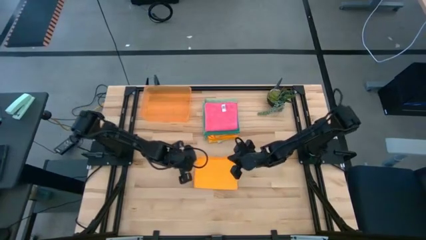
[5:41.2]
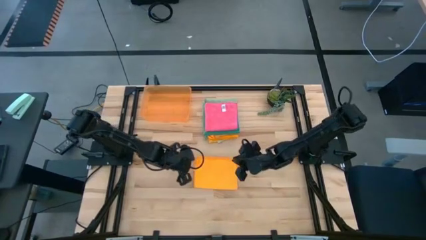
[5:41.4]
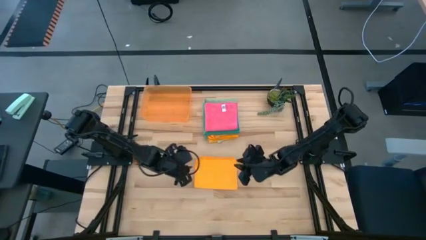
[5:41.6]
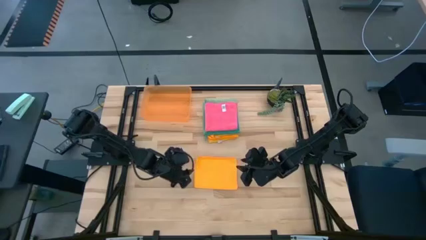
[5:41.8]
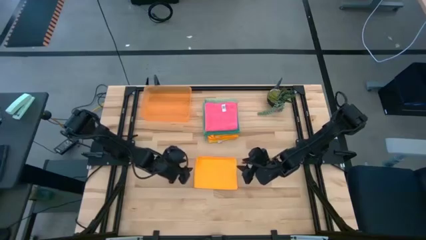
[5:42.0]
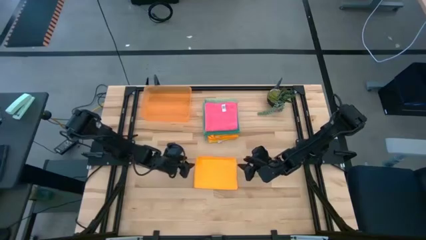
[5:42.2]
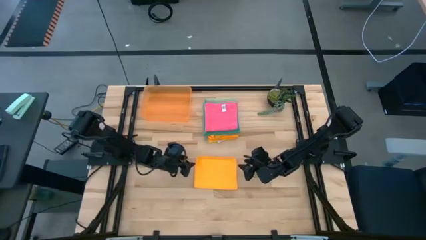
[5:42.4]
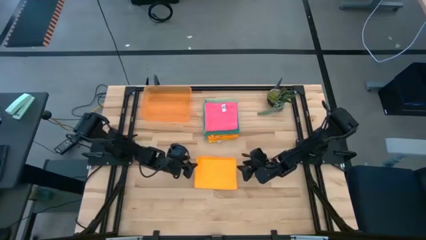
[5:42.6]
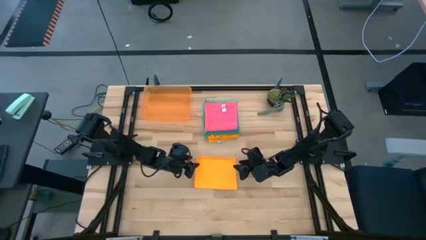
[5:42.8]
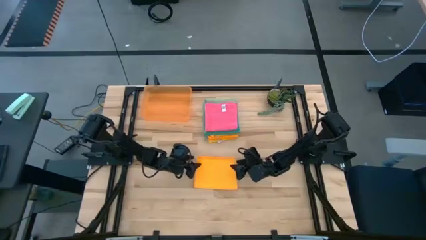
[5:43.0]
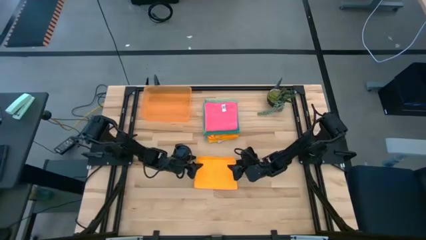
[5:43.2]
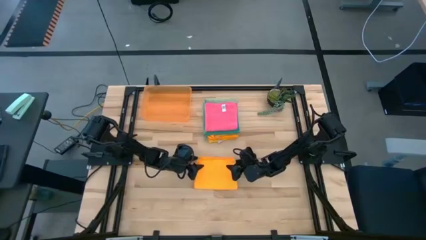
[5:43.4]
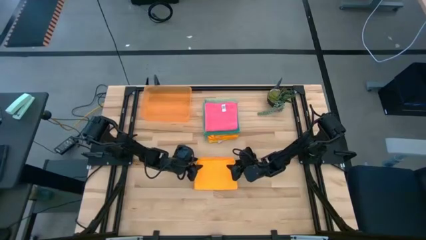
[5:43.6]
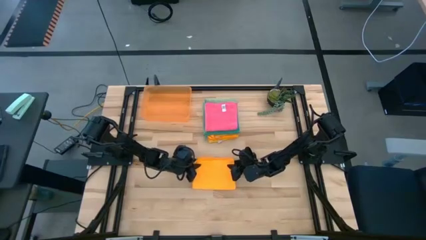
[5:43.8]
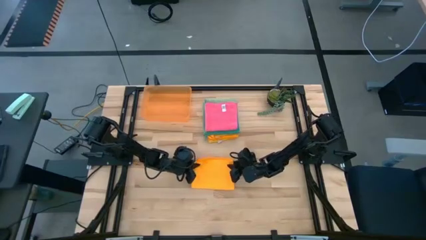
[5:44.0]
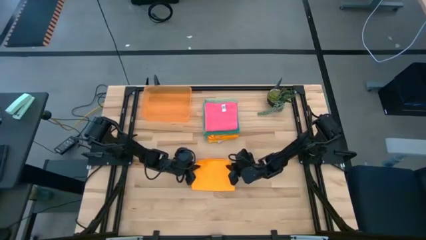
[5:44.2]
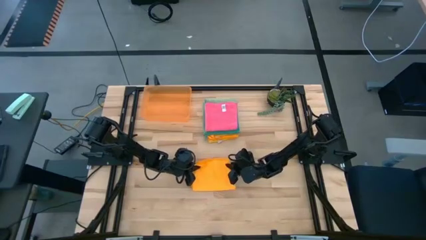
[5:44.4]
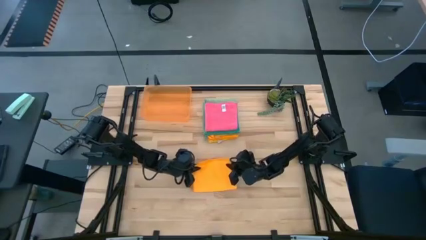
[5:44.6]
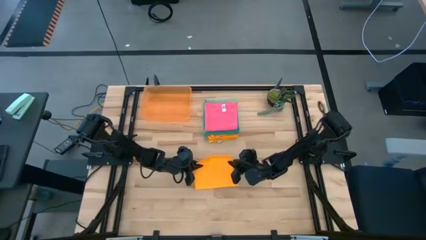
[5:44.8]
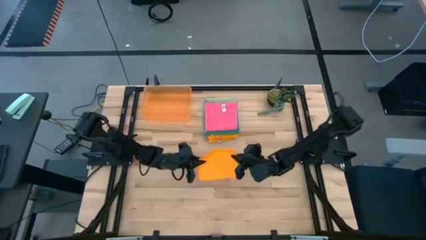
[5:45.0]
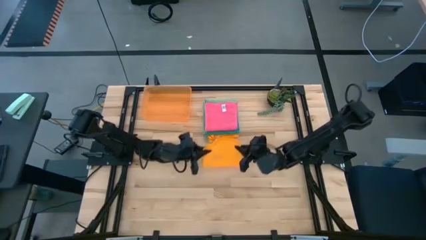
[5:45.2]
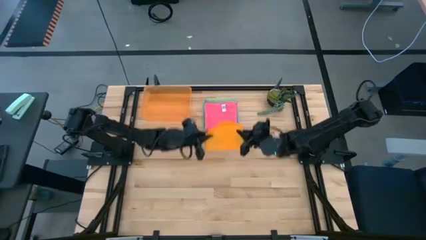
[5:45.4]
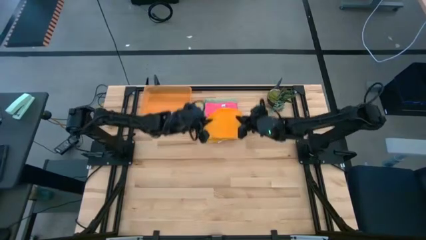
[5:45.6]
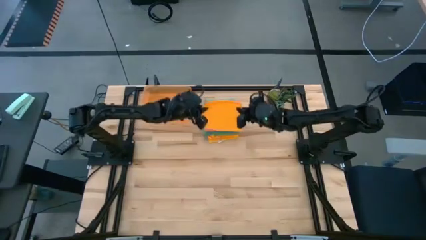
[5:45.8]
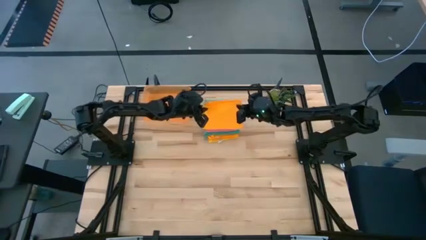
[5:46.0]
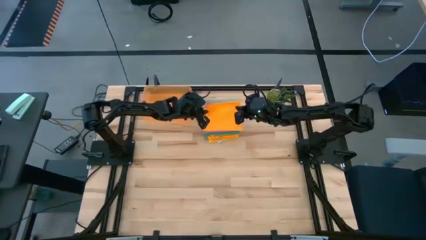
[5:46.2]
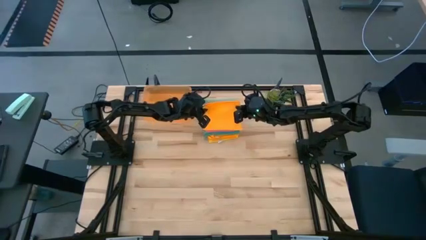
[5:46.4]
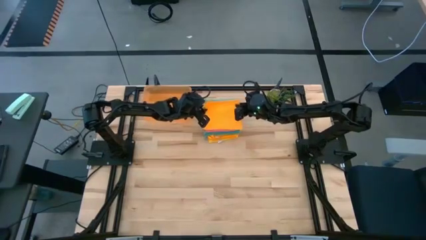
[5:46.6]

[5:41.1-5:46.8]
Task: Fold microfiber towels
Stack the folded orange towel on the folded pink towel

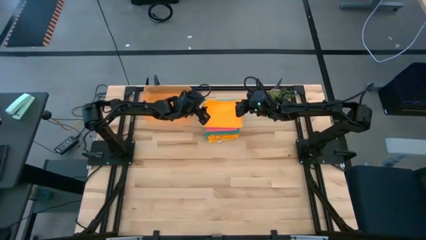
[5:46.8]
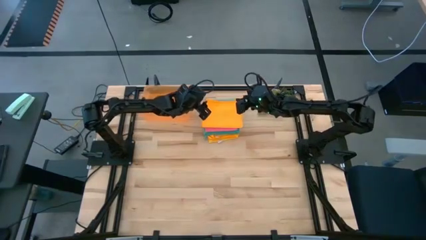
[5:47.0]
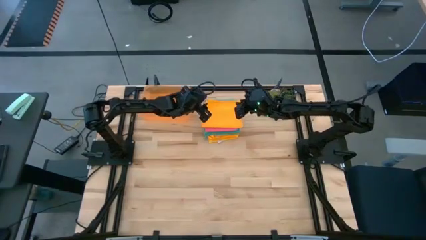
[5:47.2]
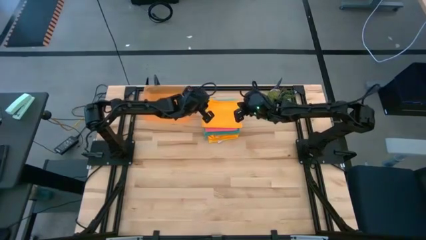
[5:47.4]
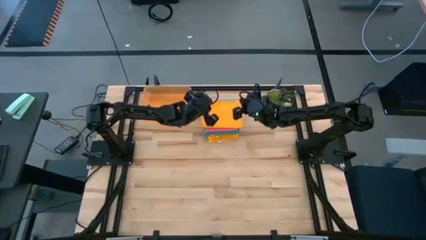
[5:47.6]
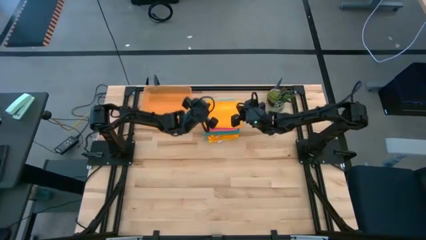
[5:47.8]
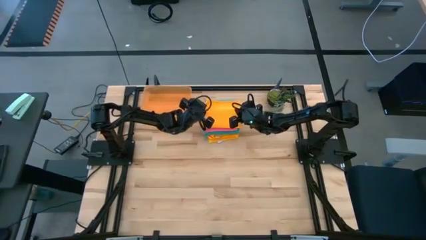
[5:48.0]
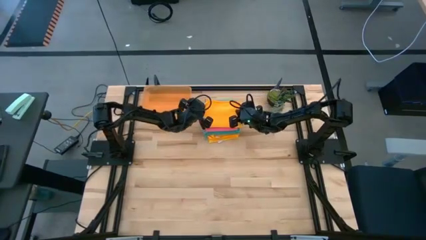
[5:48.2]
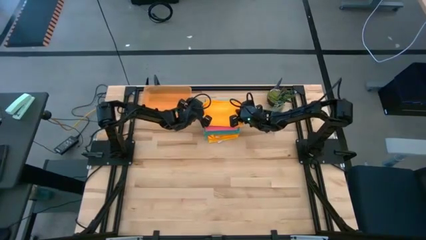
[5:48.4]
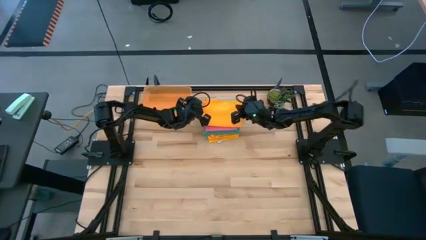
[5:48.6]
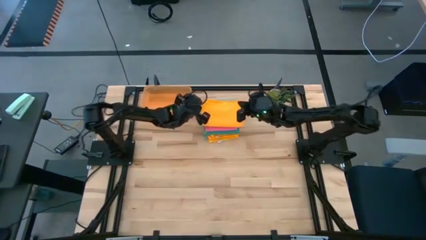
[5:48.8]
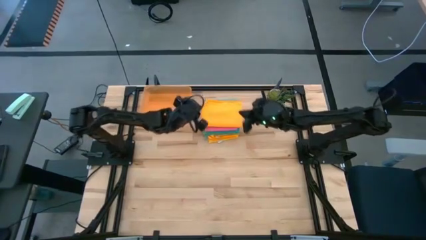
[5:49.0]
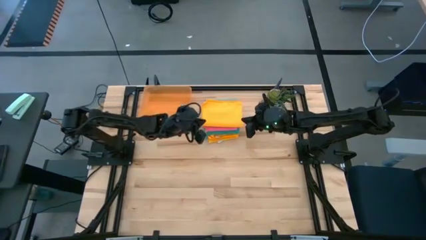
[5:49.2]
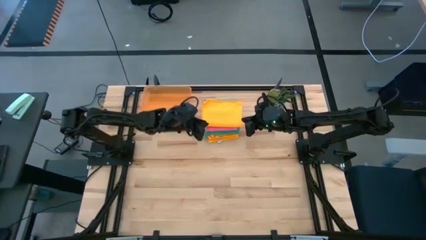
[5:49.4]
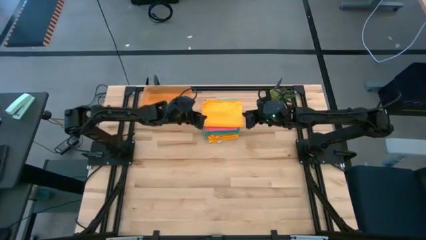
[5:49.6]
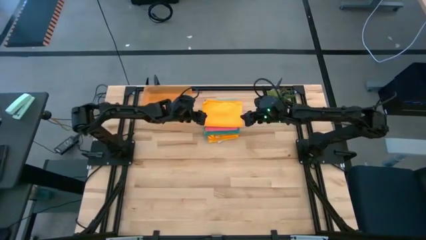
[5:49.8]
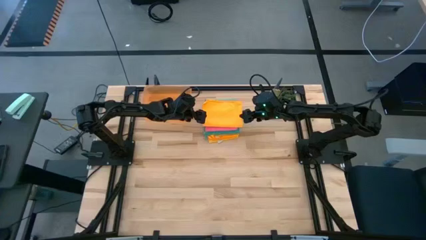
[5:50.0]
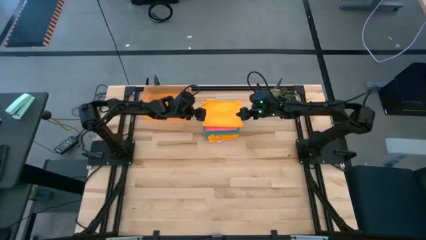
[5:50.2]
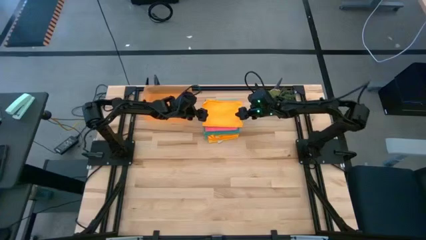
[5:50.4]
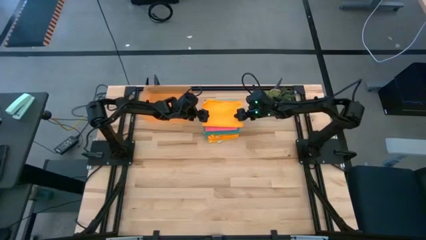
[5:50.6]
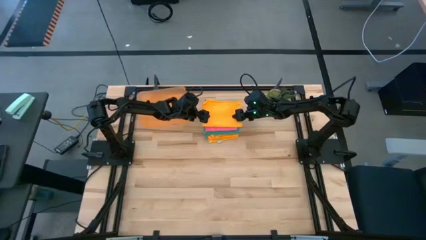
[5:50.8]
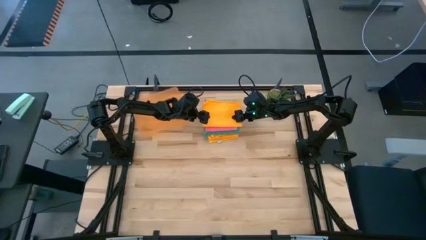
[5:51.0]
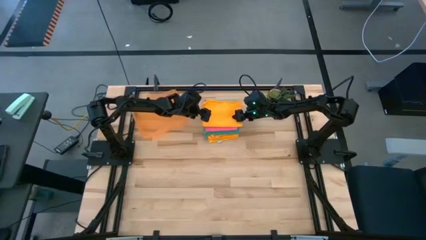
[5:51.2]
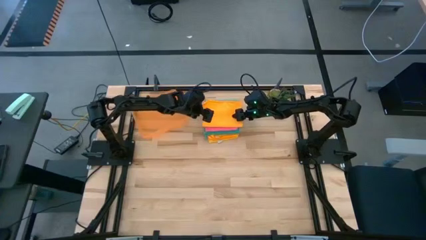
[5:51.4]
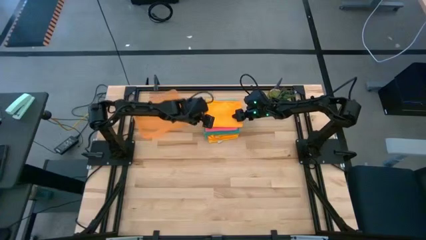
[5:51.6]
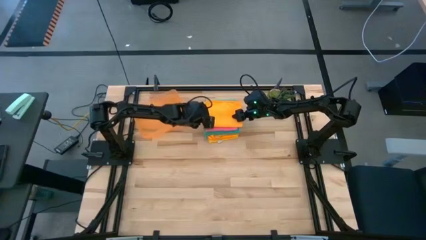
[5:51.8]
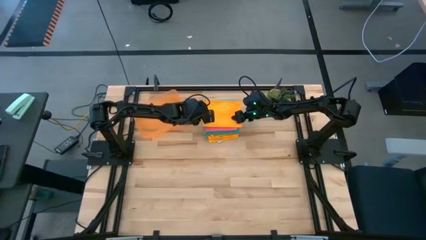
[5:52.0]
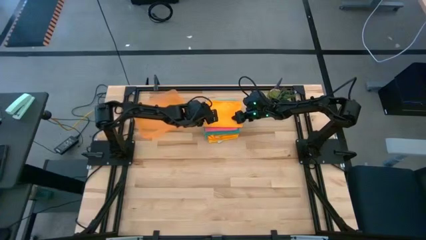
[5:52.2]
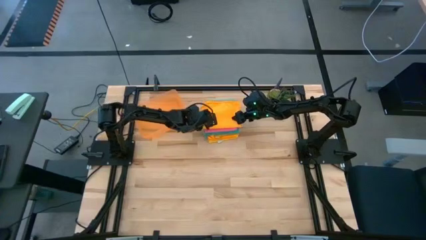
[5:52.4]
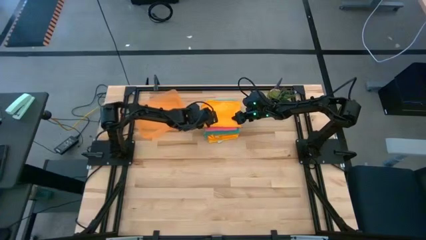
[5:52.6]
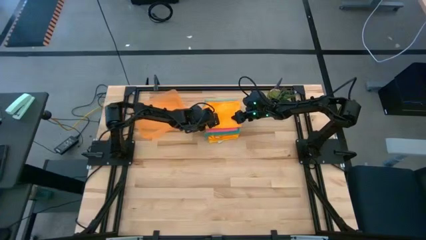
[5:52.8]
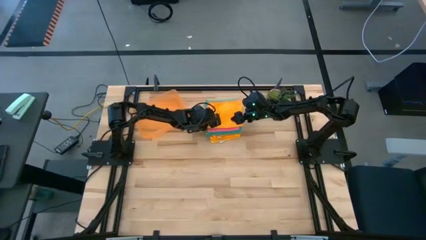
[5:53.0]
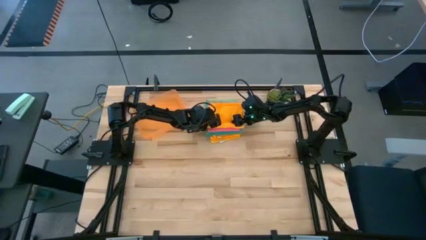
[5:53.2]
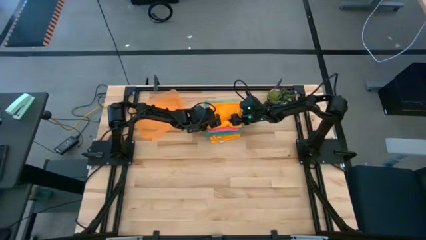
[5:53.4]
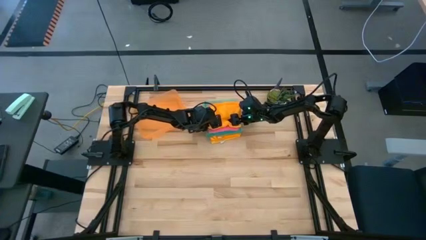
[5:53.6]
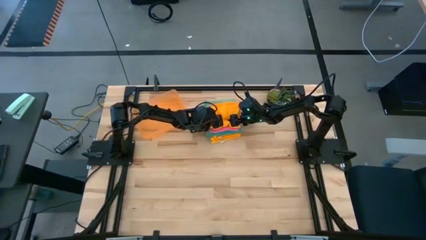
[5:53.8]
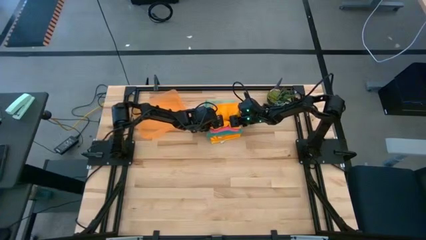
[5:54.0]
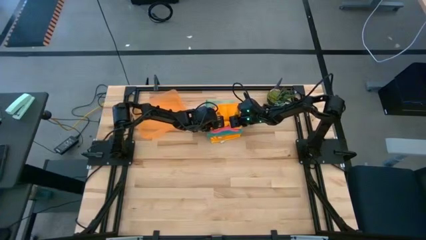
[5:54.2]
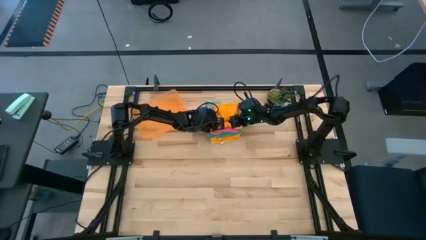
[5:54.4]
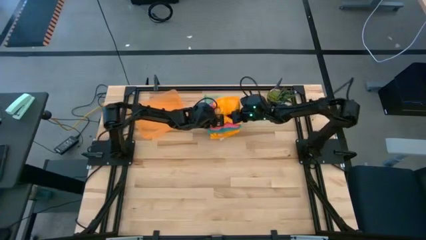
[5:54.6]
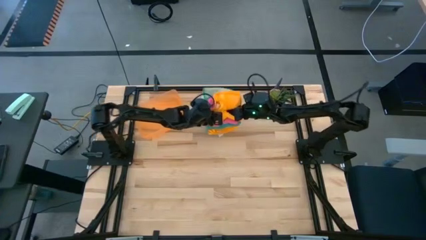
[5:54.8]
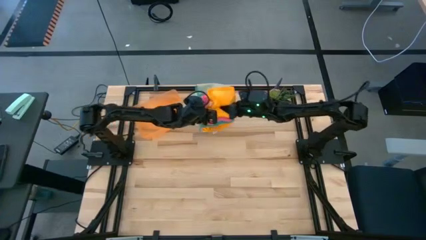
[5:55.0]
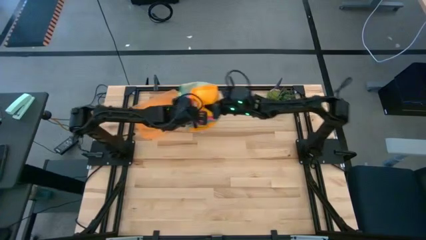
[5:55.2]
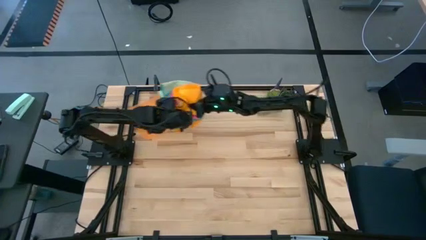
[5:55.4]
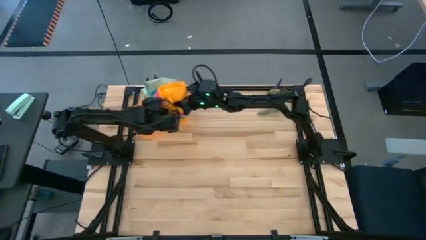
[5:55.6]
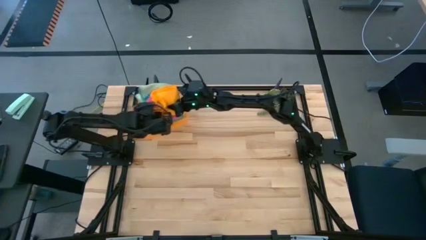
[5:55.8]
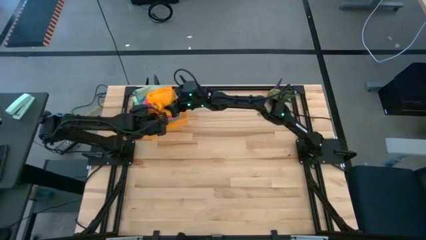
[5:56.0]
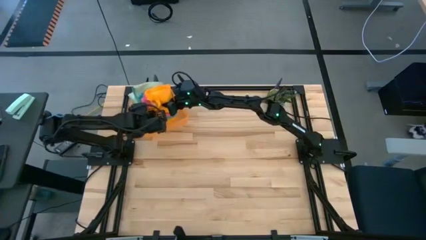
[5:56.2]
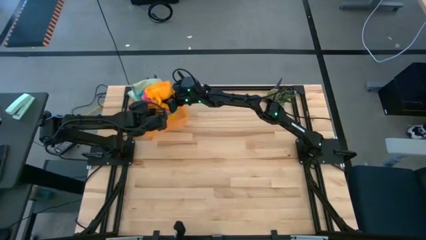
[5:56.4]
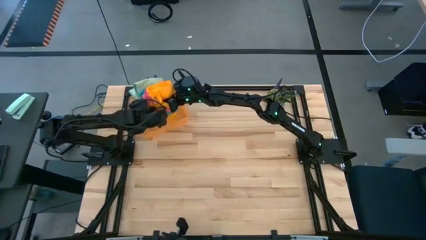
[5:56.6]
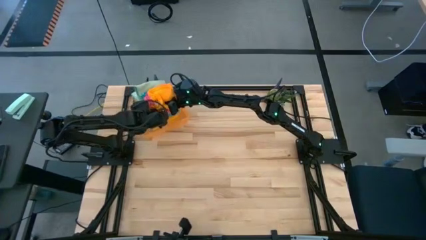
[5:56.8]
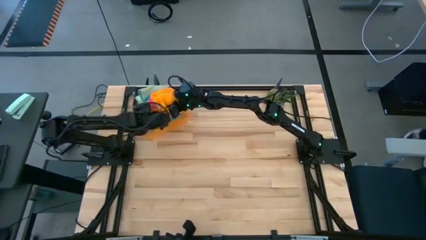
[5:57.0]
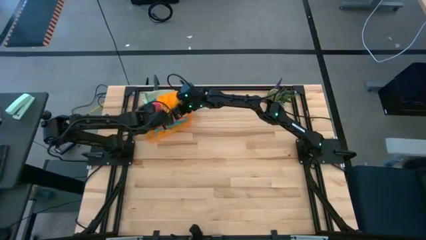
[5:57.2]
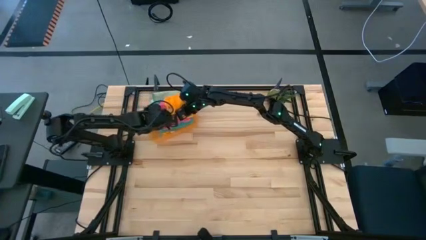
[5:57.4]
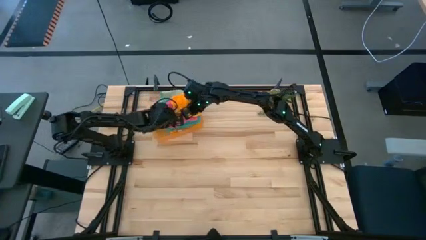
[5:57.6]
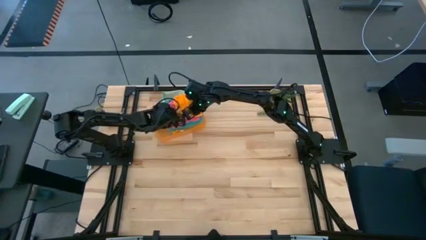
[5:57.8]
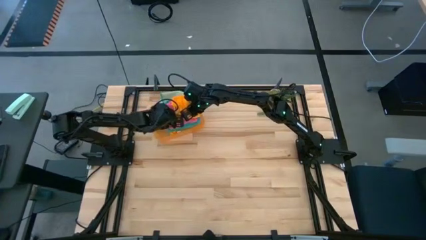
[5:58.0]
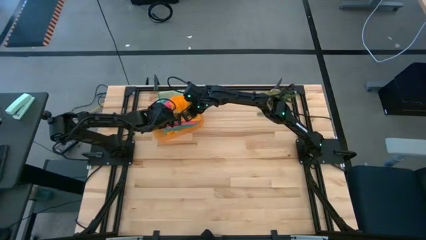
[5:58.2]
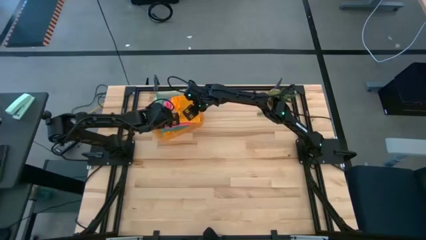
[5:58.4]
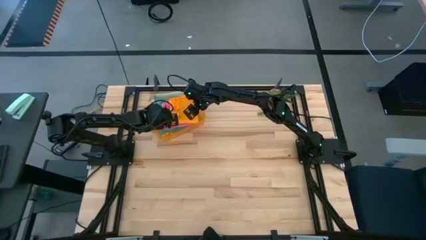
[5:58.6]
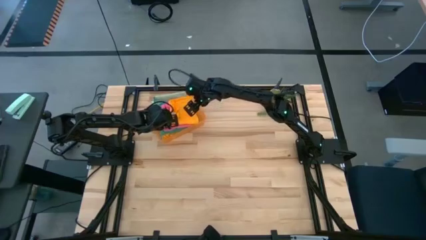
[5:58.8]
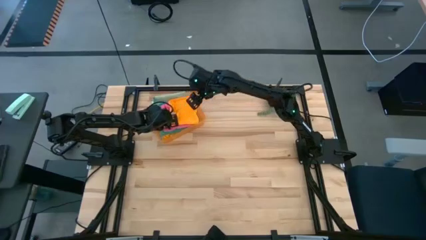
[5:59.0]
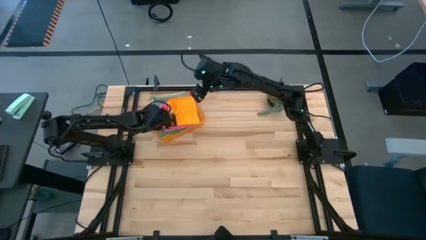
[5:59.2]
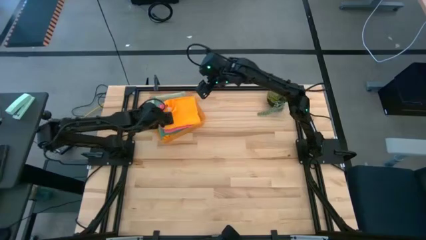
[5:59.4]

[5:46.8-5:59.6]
Put the stacked towels into the transparent orange bin
